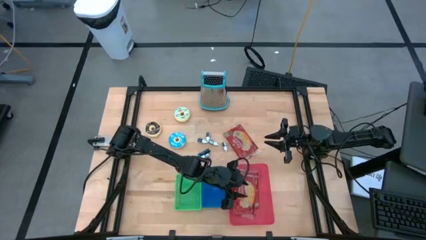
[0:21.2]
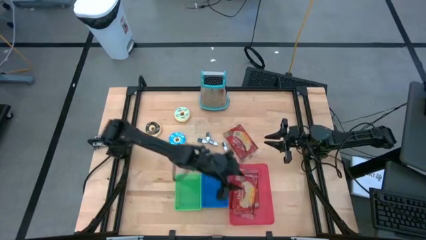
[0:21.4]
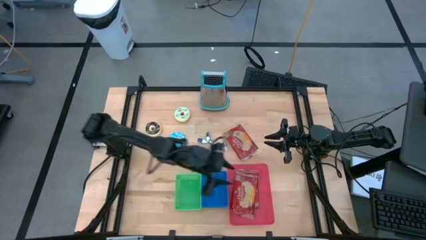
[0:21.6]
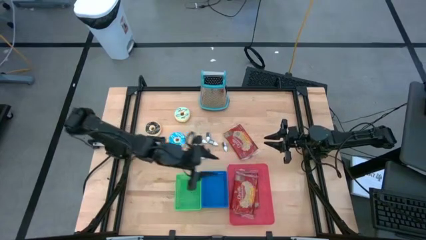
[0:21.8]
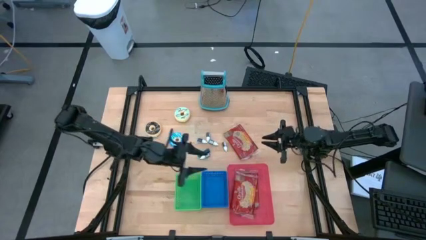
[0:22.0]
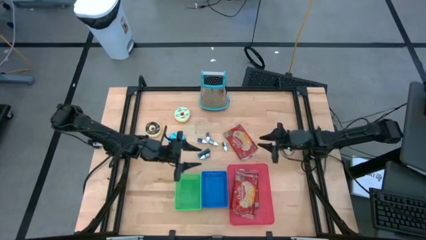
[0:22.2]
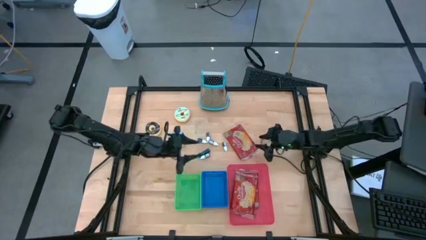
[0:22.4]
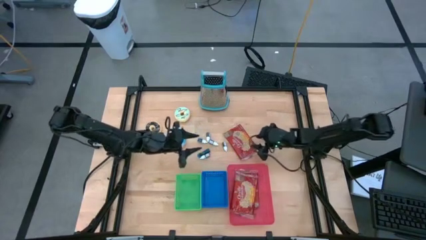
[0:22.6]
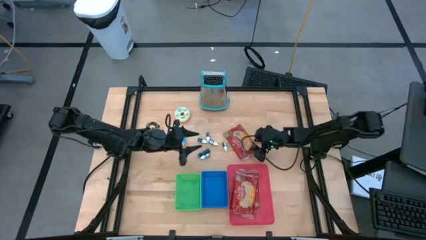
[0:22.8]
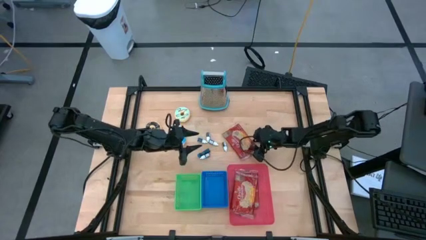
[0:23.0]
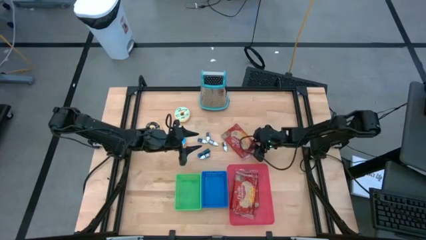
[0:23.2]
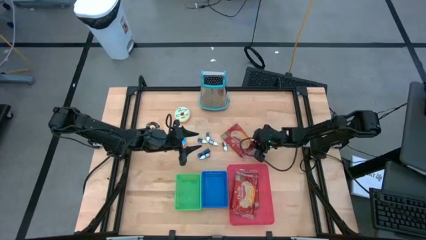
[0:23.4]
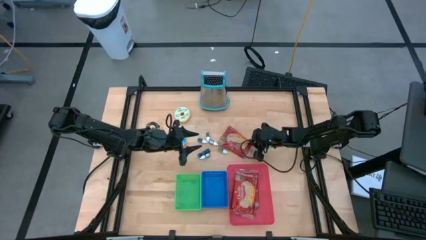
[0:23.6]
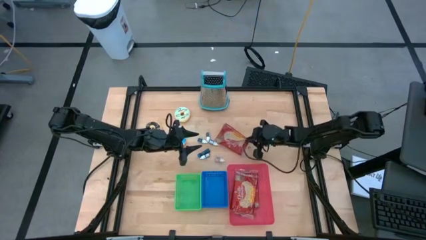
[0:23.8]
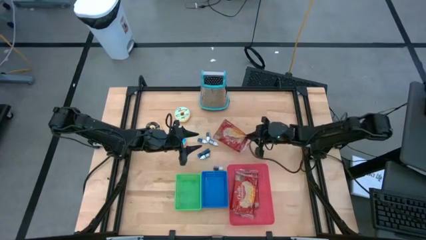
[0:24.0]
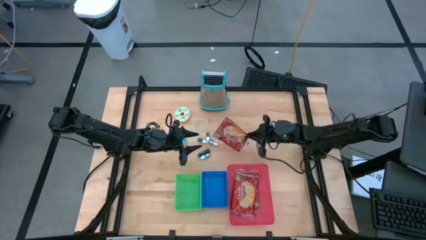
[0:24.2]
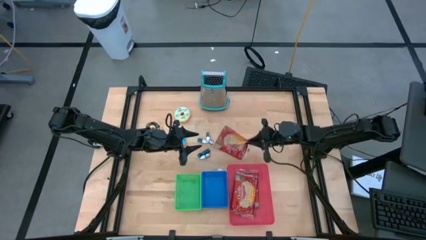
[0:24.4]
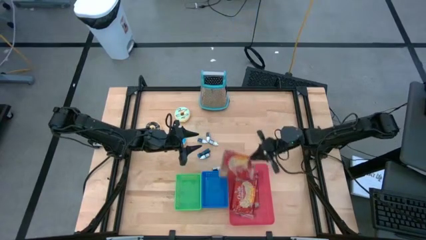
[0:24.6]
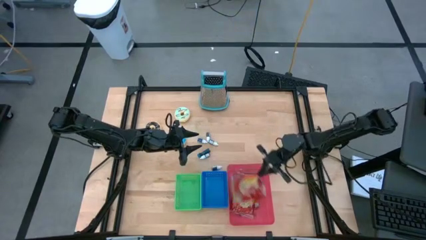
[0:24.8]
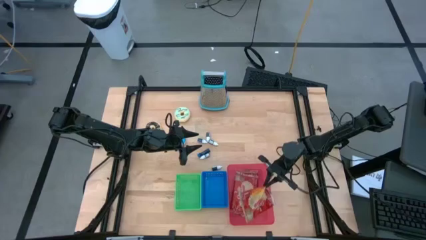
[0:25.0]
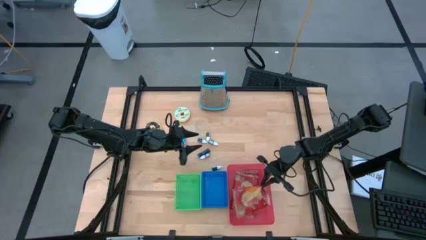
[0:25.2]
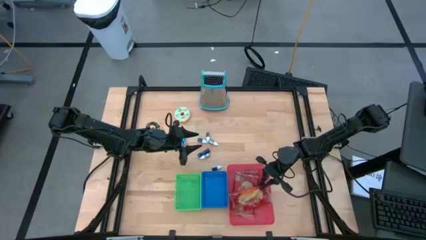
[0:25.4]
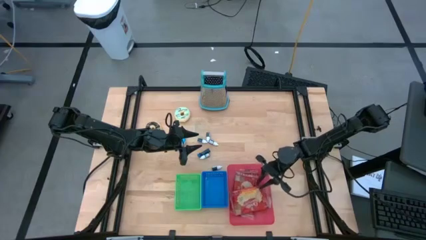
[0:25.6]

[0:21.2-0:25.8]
Put the red popcorn bag into the red bin

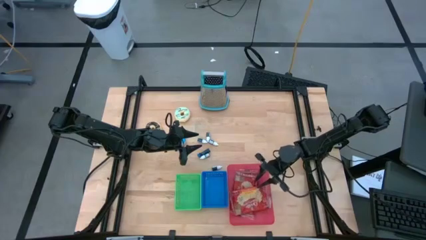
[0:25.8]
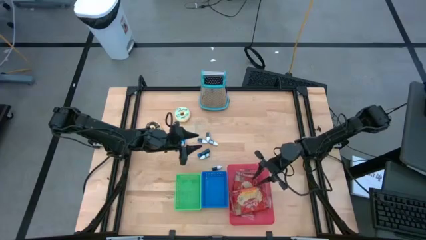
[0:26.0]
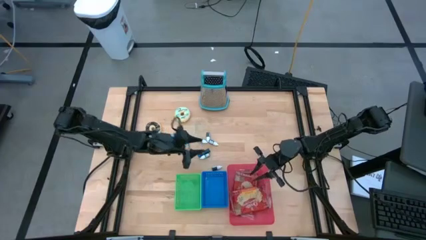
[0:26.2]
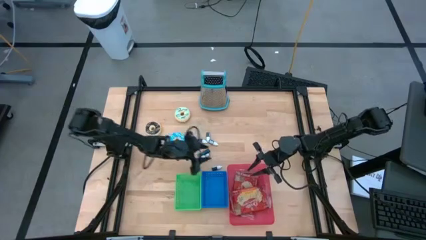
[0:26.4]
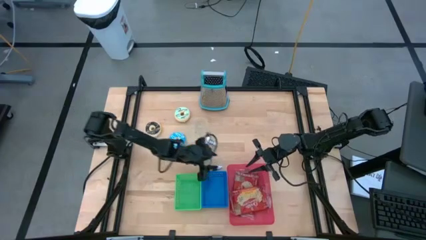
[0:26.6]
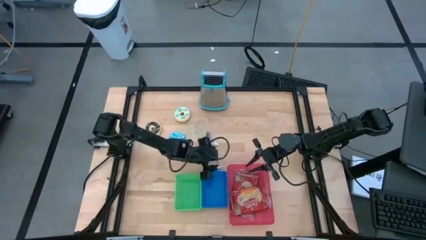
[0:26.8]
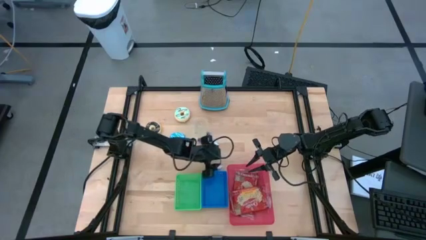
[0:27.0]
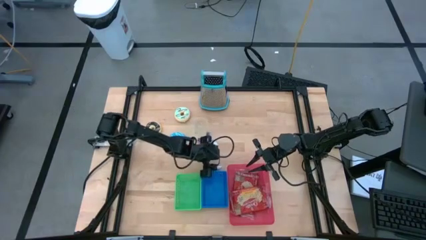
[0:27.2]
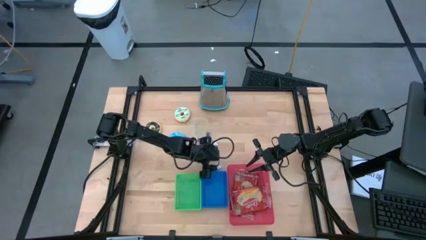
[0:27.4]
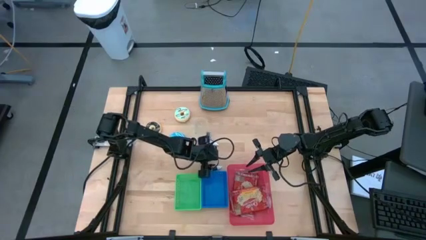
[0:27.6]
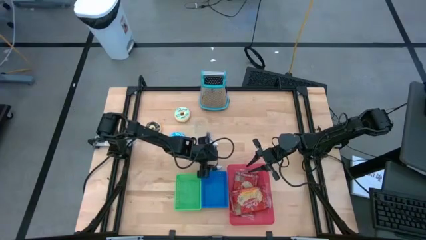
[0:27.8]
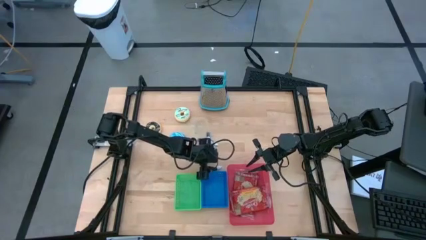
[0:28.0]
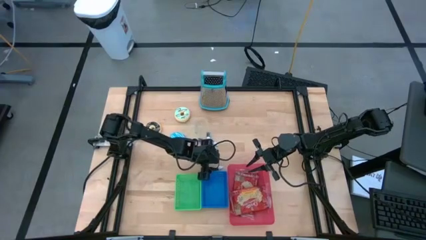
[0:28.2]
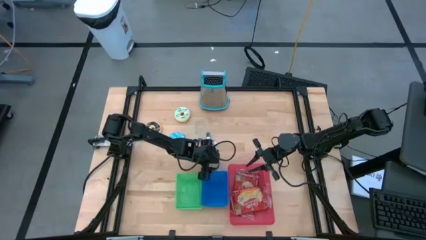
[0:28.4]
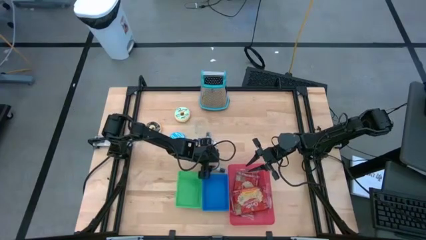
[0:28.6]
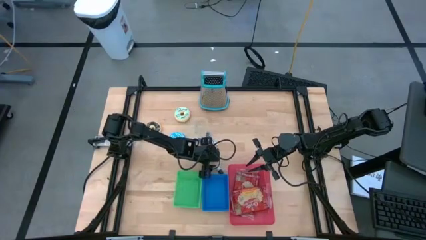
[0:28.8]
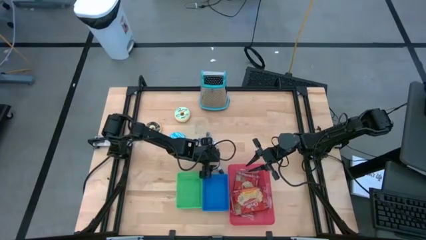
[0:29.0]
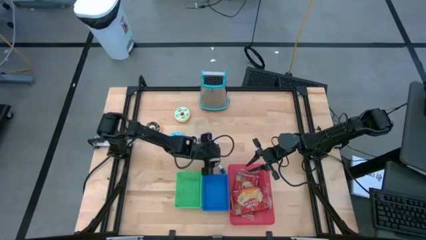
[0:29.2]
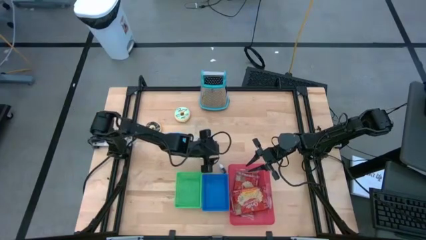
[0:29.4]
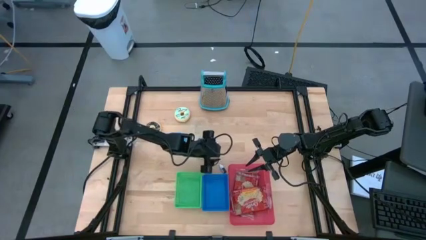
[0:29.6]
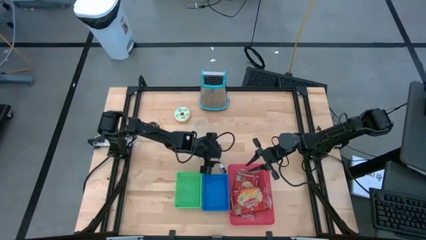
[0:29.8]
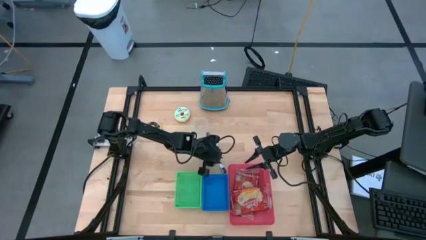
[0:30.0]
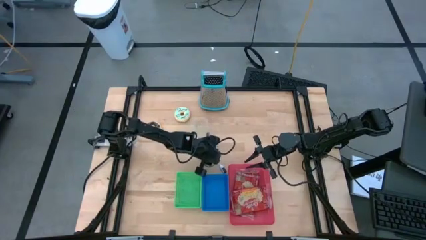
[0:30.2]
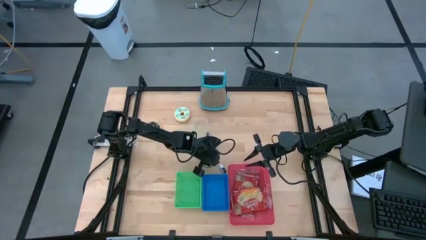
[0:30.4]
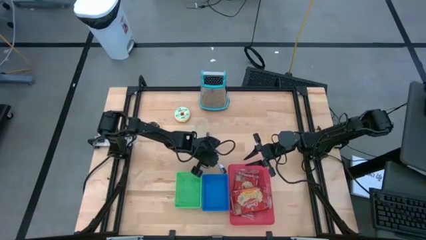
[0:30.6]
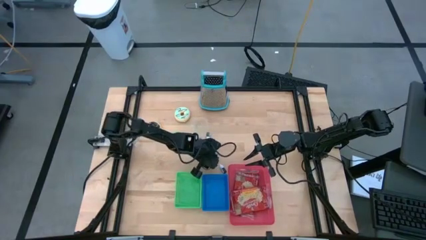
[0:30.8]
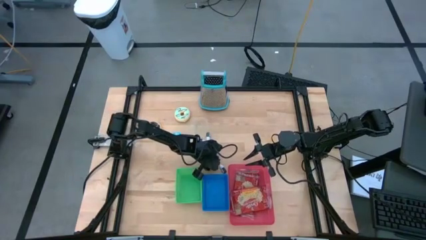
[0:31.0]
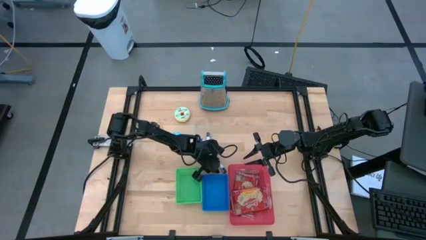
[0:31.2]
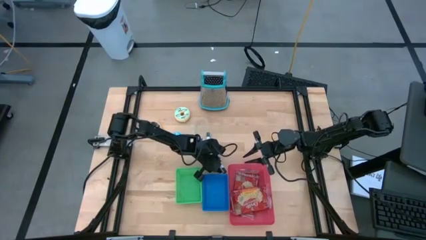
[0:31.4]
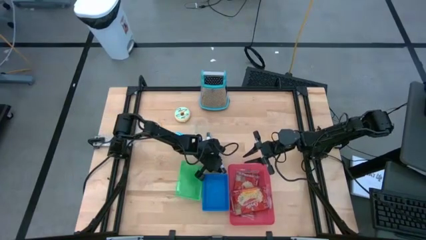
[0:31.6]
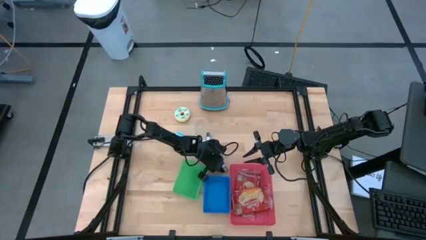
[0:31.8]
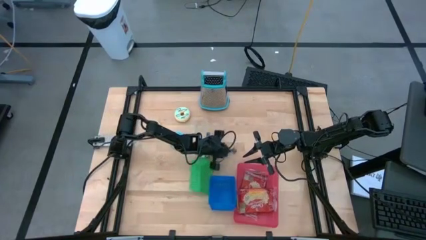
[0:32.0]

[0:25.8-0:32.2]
Put the top green food coloring bottle into the blue bin

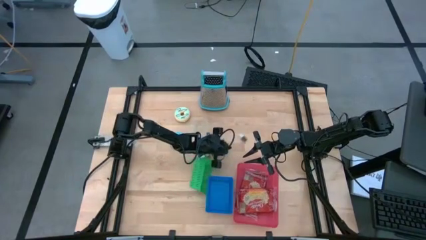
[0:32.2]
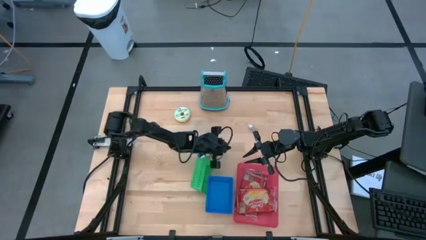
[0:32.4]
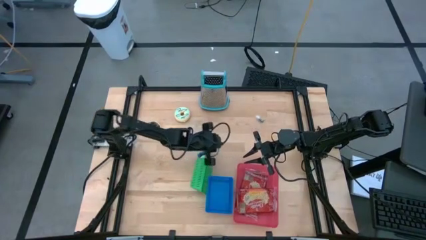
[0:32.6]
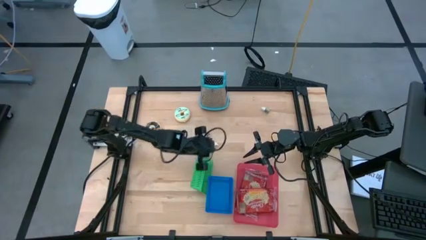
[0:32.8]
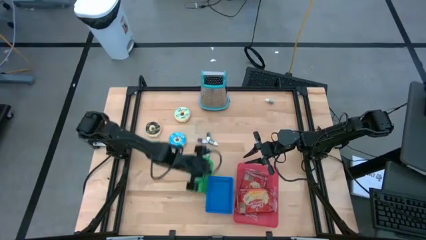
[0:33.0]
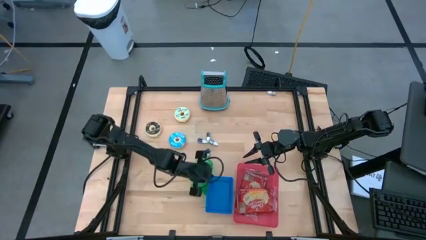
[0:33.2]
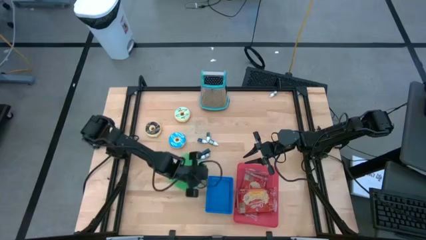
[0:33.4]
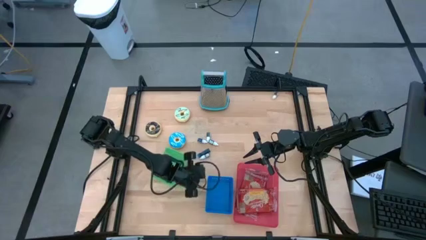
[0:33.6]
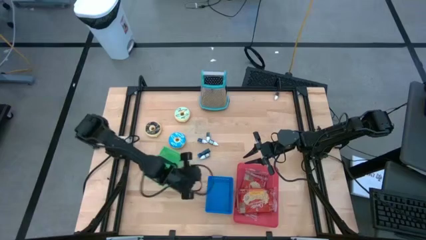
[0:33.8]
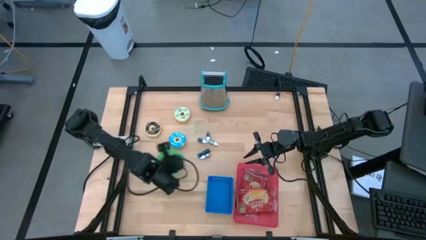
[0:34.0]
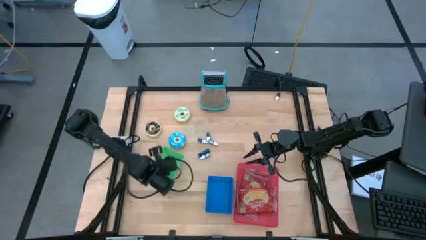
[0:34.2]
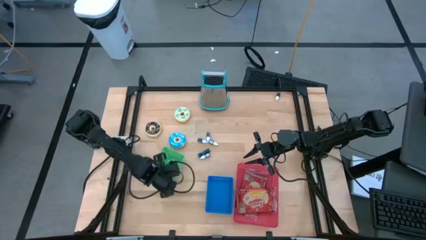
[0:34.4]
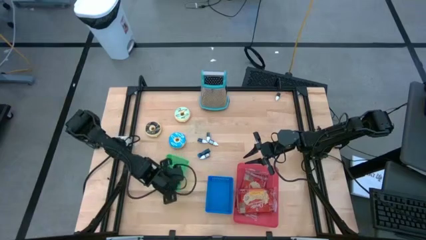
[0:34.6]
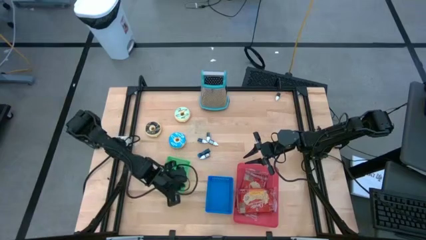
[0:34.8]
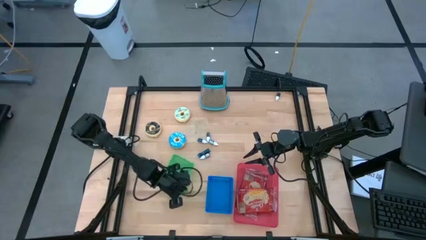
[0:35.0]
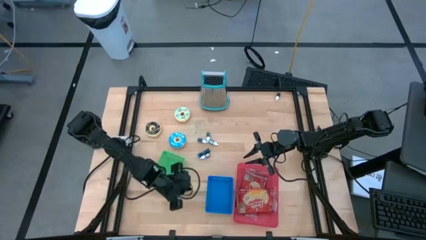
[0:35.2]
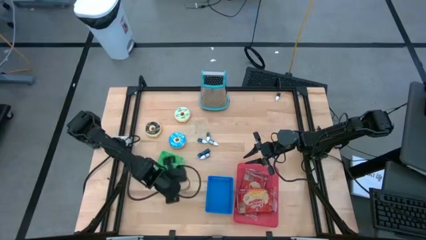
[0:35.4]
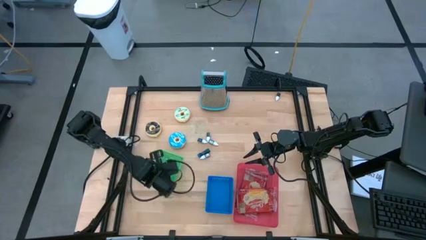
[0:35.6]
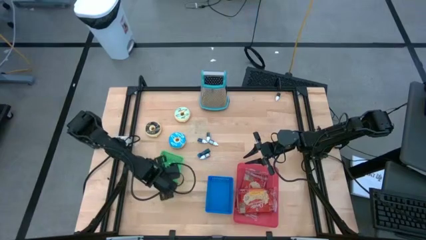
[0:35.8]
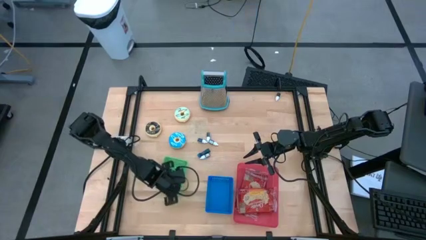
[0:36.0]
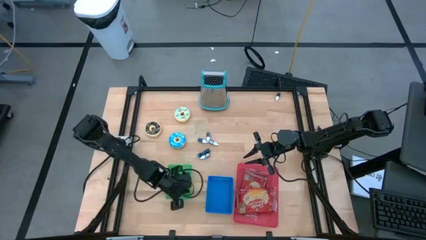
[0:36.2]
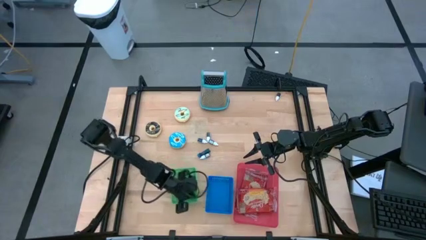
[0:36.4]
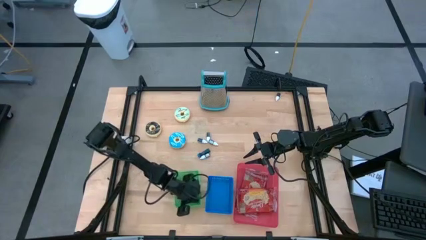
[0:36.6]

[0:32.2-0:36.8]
Adjust the green bin on the table
